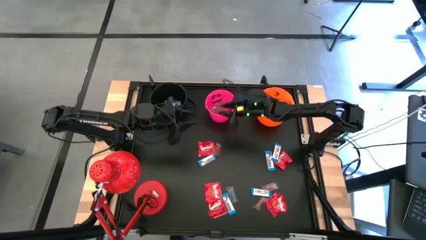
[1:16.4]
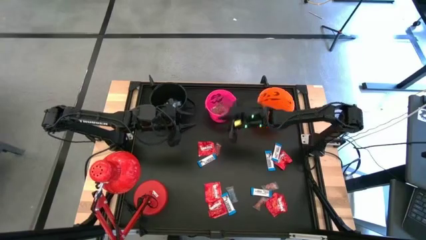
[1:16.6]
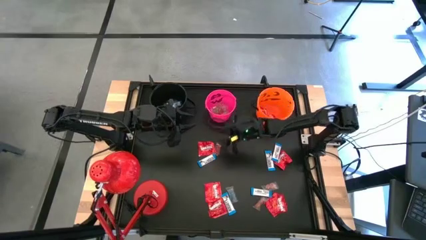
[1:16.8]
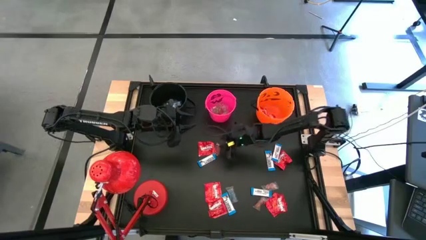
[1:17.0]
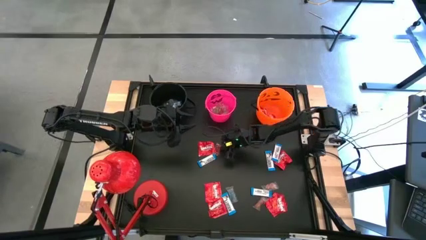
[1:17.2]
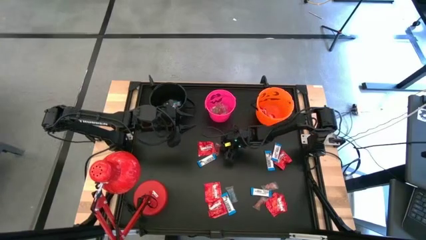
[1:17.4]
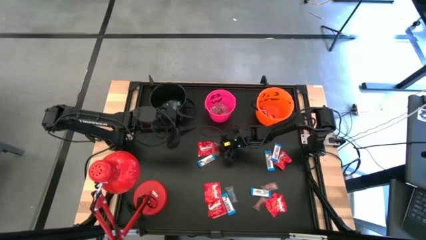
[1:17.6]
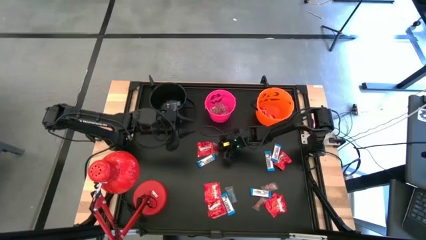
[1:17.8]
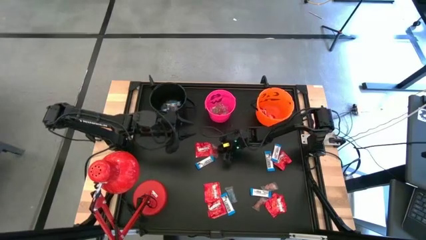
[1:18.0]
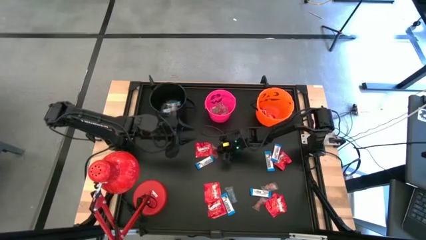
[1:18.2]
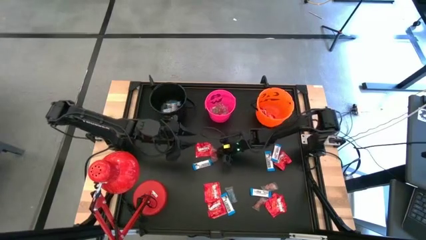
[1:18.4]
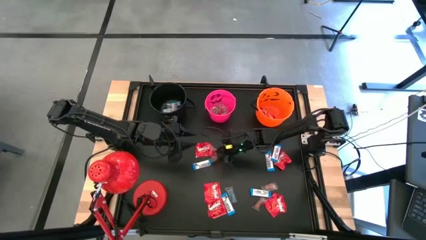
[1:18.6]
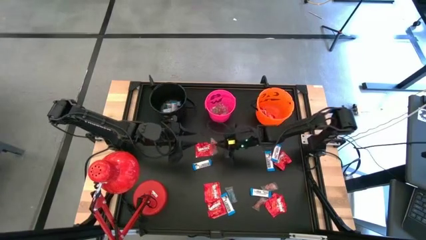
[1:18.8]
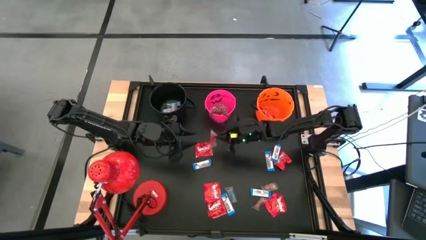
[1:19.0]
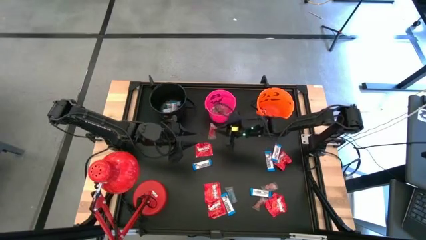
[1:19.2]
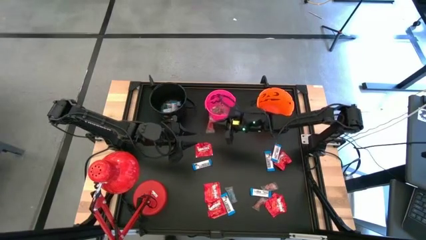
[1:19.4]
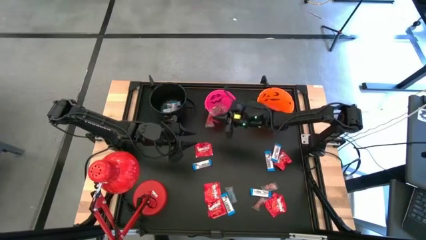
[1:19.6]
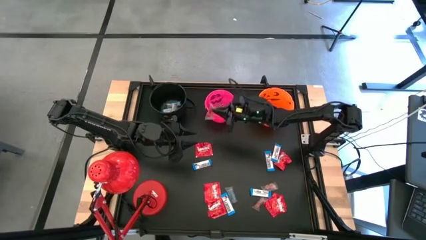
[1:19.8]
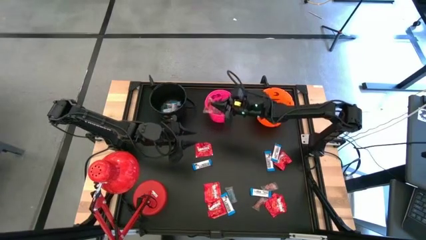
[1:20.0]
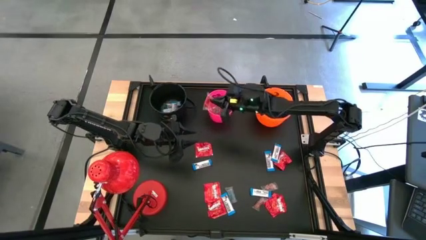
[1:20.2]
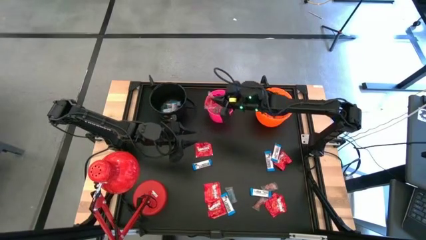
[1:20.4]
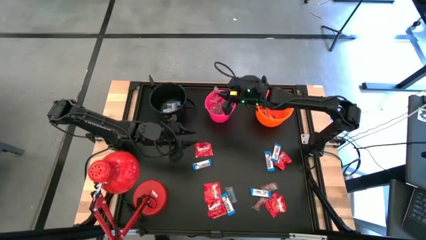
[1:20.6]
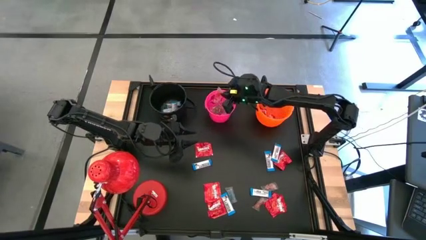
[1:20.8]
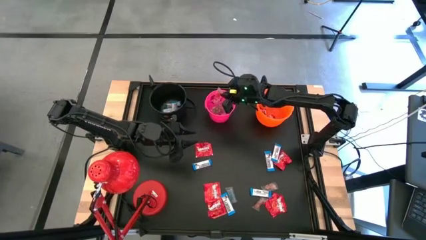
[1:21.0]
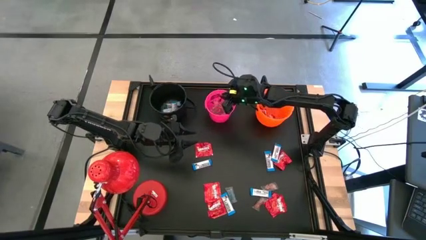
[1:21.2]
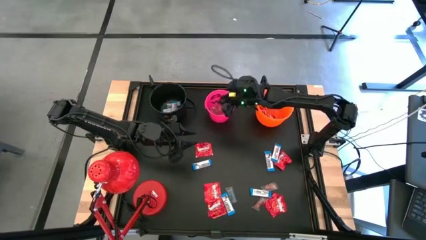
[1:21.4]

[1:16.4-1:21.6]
Task: Organize candy in baskets
Put the transparent candy into the pink bucket

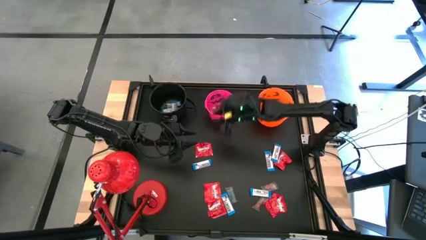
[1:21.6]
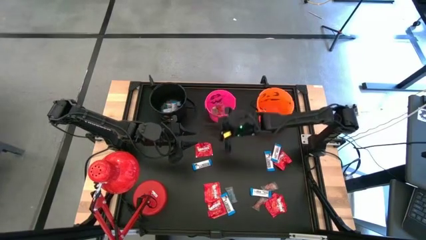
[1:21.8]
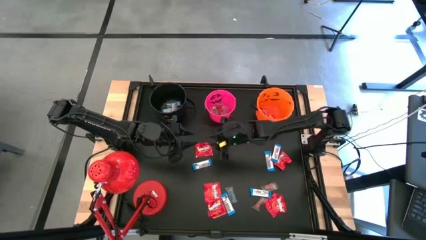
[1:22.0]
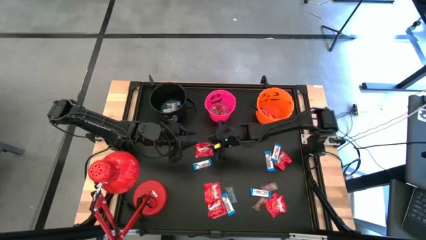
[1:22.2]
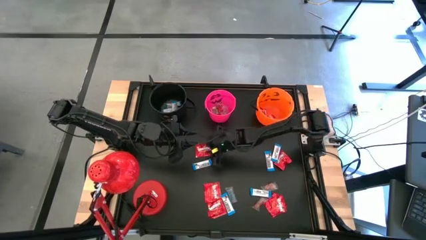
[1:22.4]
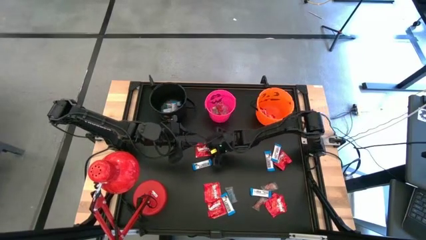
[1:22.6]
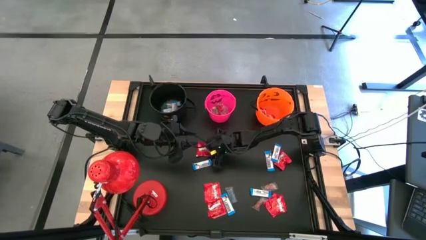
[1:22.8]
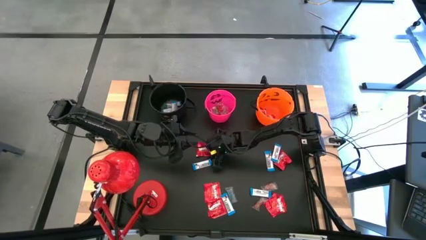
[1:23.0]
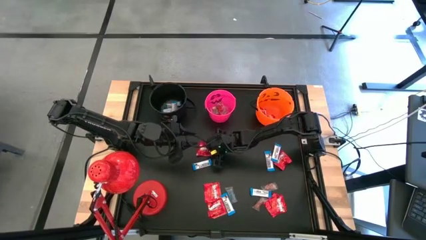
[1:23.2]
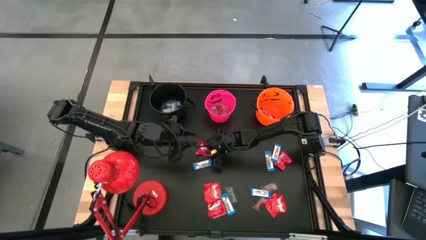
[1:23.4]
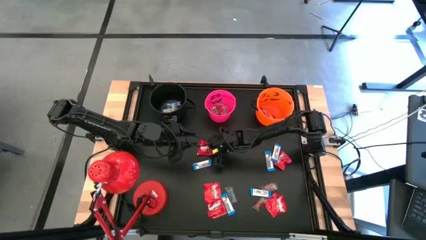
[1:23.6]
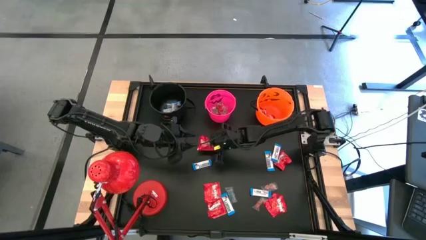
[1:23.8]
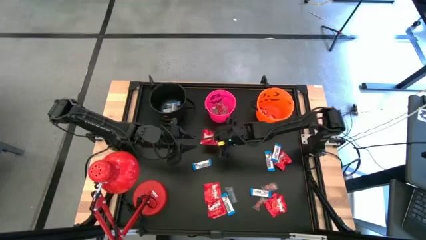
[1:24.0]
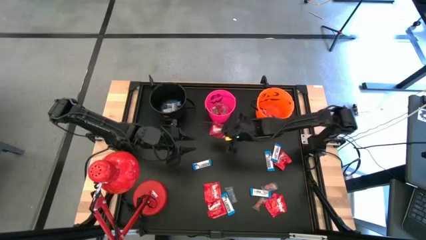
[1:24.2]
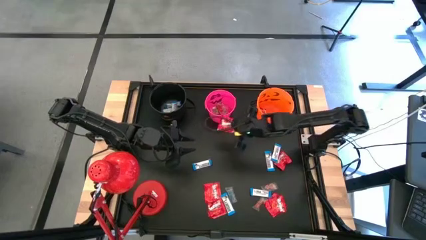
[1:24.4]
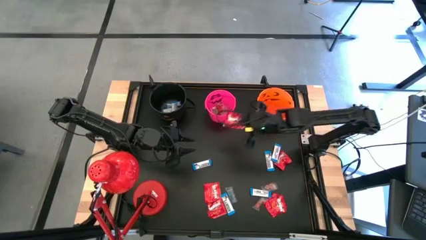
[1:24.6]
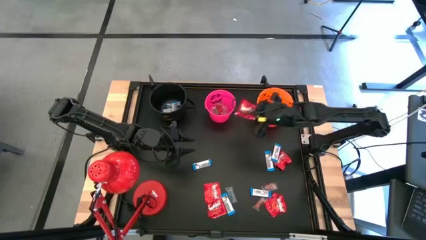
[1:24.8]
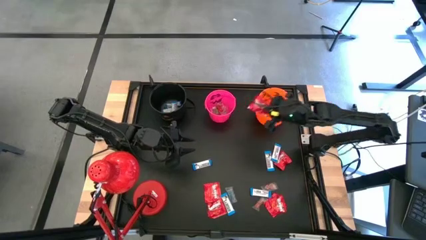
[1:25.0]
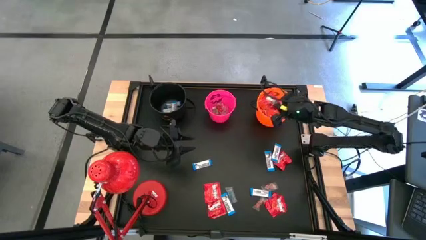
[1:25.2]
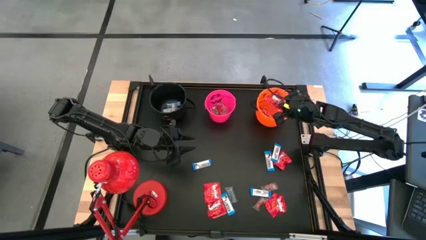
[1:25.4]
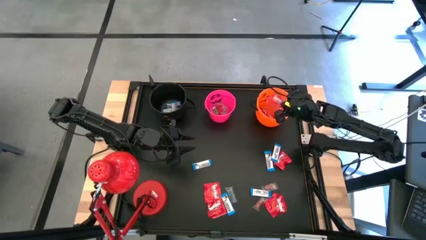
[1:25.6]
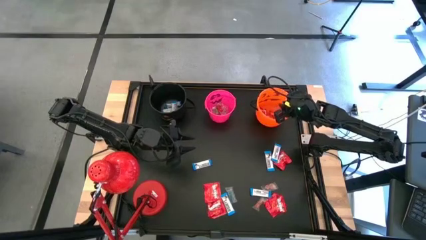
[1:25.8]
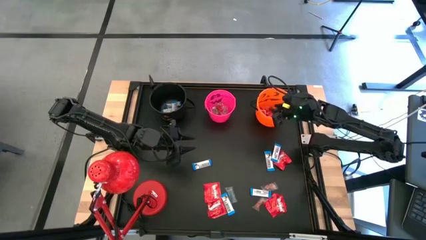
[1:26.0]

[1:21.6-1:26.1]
Put the red candy into the orange bucket

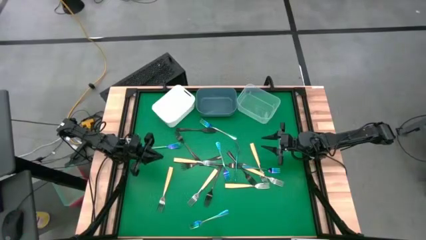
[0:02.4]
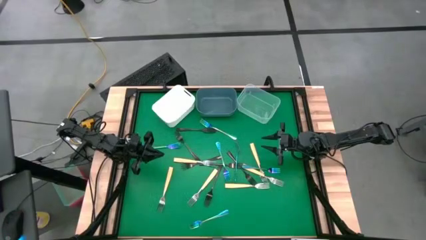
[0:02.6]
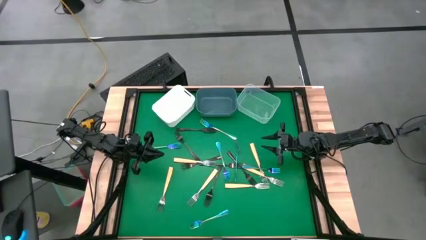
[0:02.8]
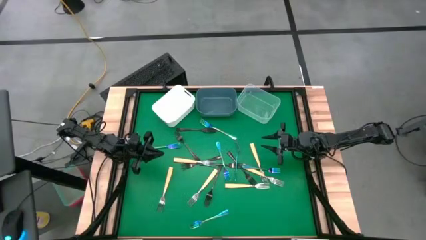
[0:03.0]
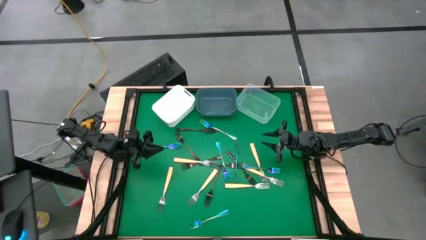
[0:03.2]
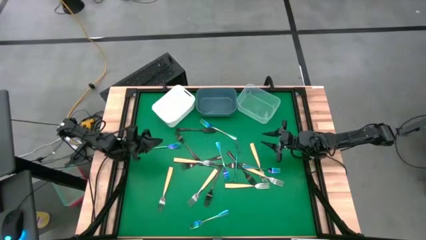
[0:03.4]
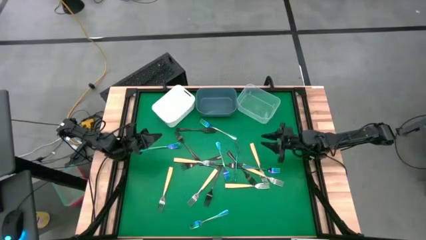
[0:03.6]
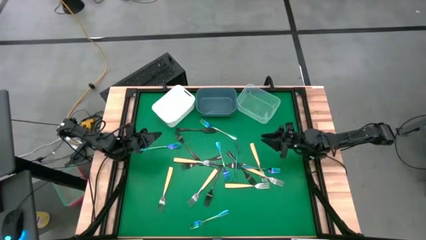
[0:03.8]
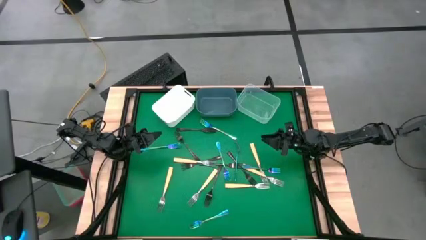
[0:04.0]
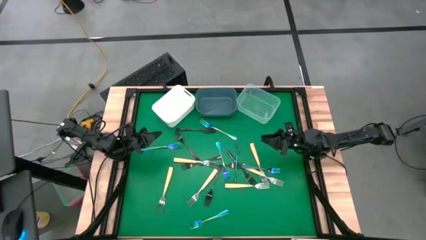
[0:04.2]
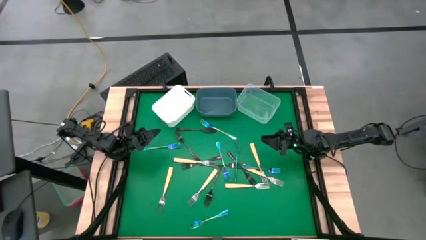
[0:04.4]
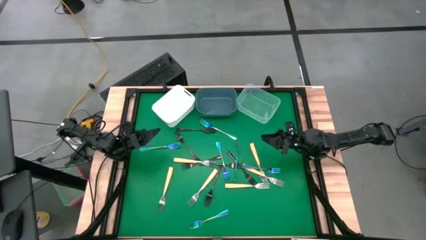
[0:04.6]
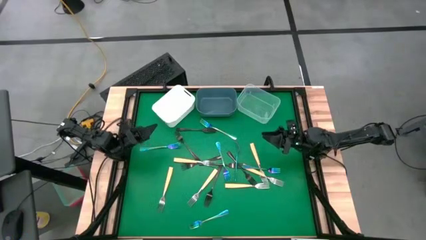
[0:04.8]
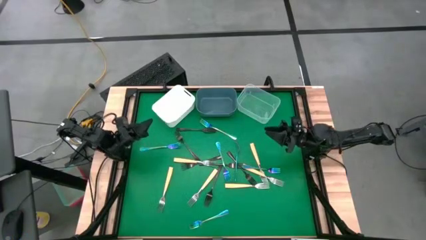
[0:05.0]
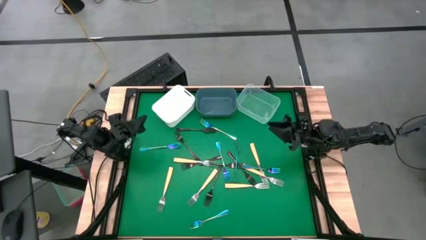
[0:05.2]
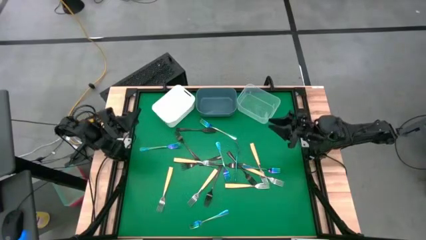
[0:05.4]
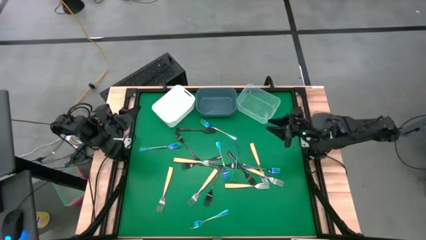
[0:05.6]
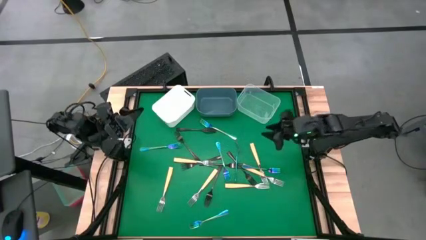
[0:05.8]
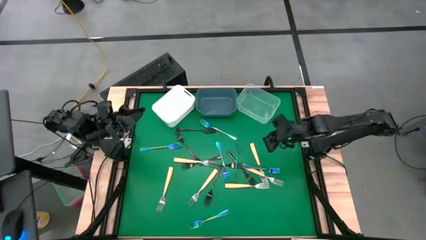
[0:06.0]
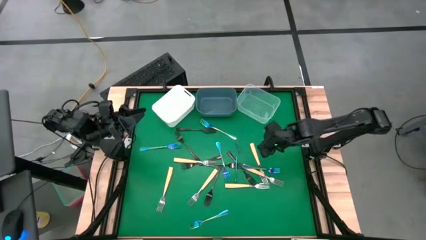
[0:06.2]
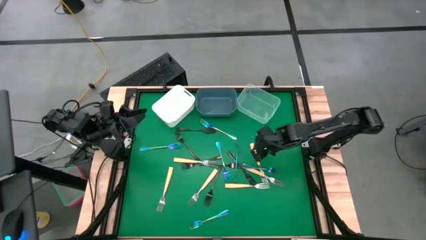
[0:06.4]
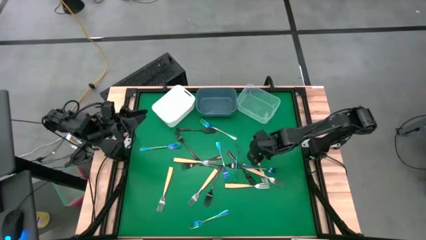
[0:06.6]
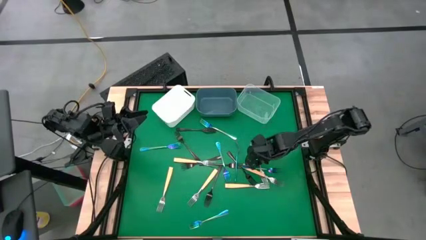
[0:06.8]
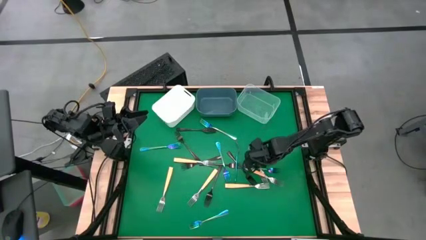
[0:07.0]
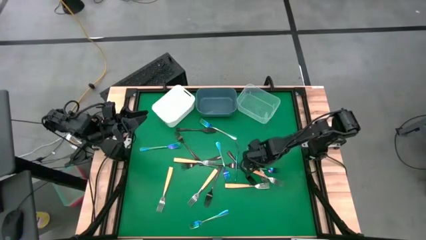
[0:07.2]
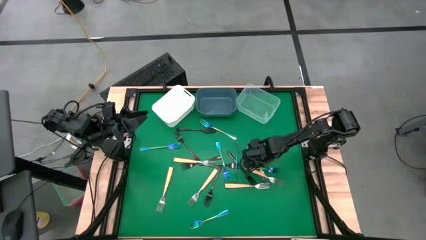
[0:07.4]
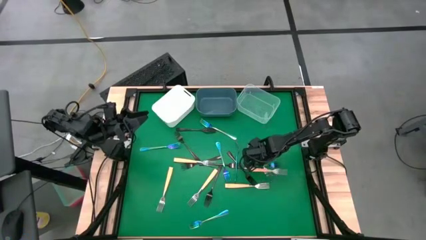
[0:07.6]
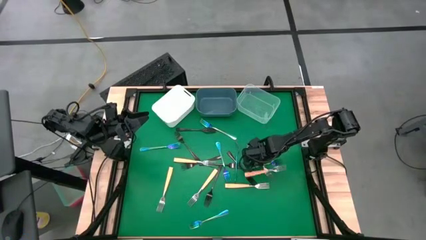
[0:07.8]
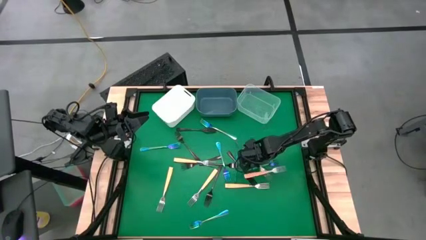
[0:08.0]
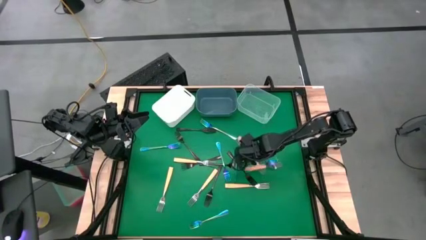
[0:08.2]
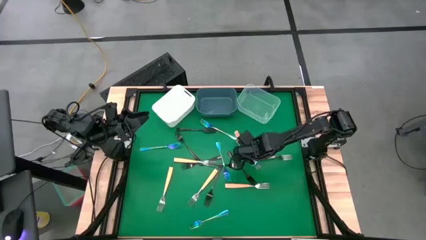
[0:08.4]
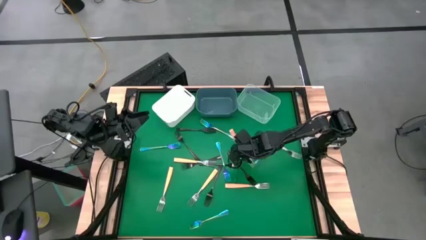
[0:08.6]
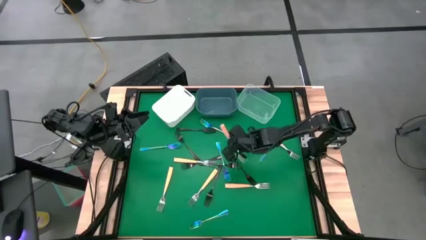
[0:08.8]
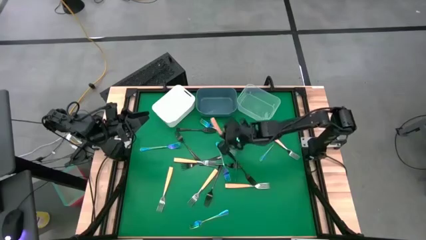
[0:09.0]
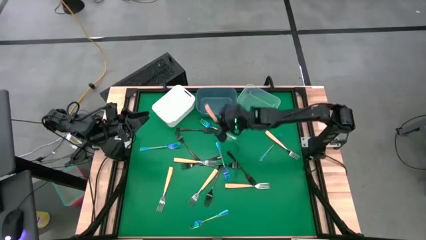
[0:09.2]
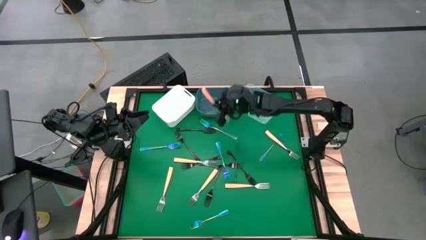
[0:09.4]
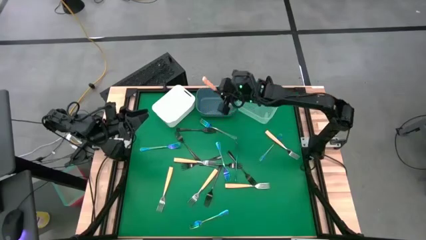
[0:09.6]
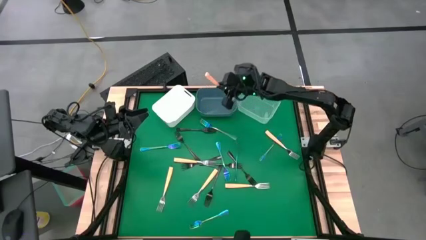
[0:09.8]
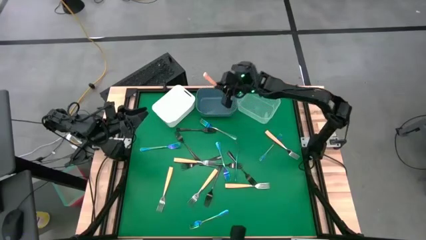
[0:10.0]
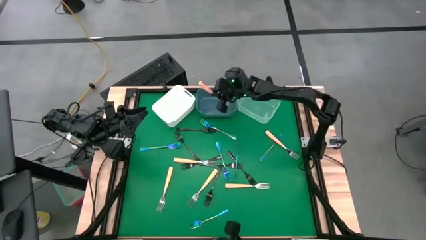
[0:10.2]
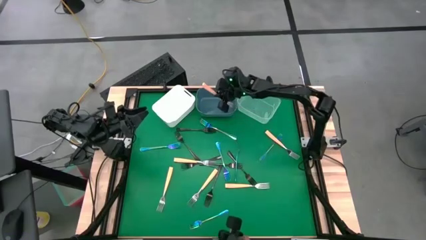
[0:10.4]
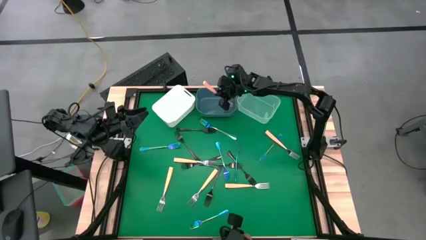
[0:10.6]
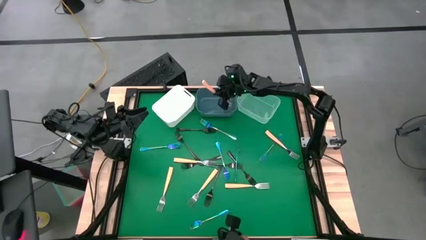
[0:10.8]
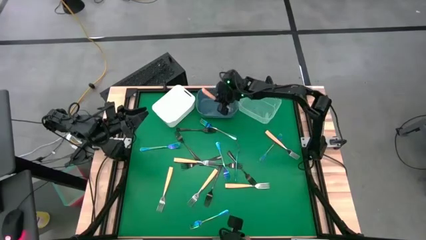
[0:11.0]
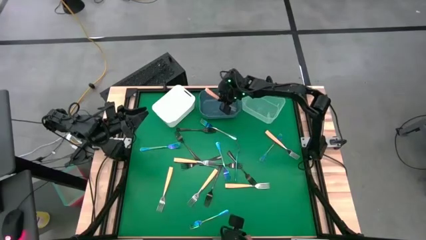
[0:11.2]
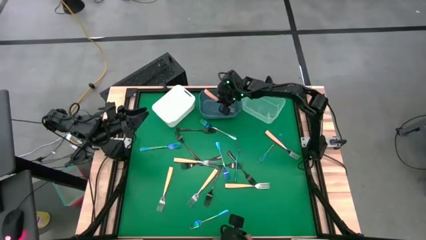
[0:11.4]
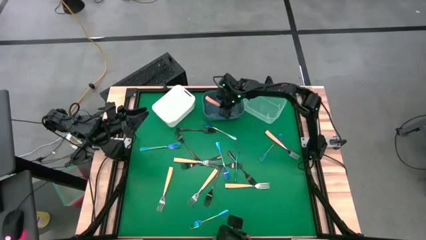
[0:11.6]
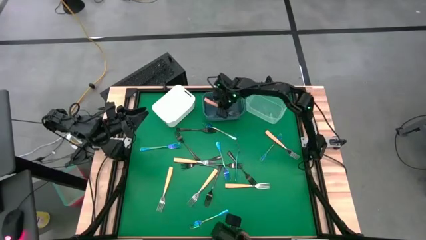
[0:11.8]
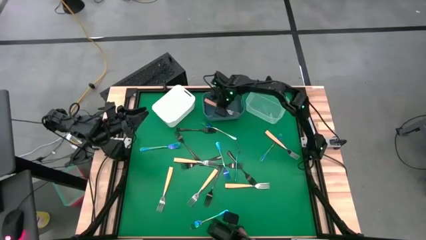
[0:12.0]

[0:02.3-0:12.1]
Task: Sort silverware by color (type)
Put the yellow fork into the blue bin
